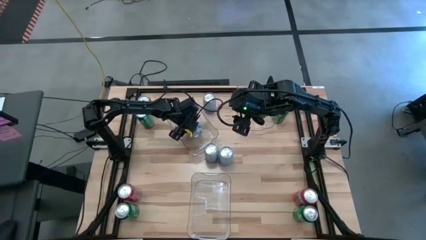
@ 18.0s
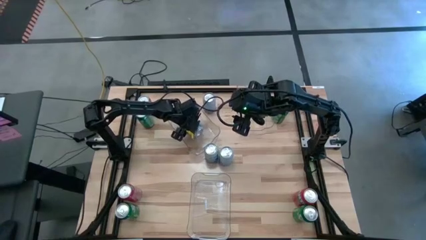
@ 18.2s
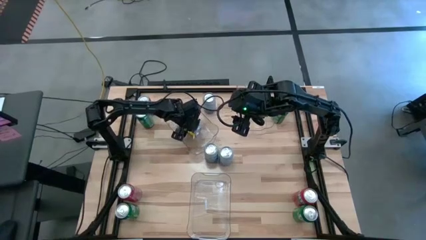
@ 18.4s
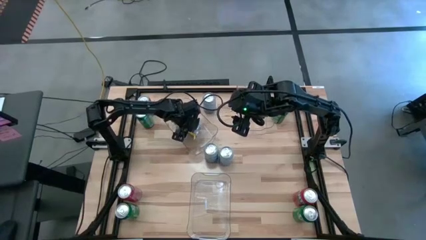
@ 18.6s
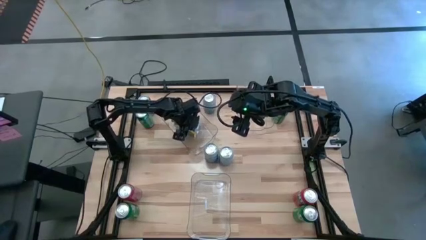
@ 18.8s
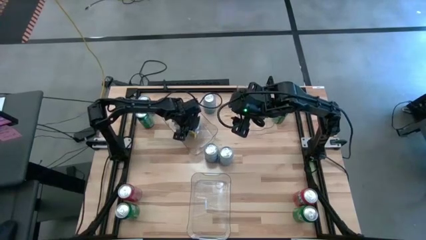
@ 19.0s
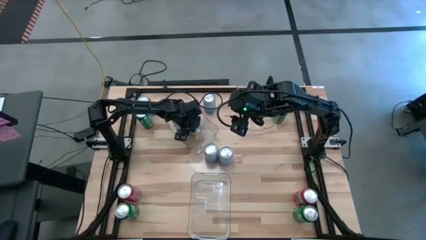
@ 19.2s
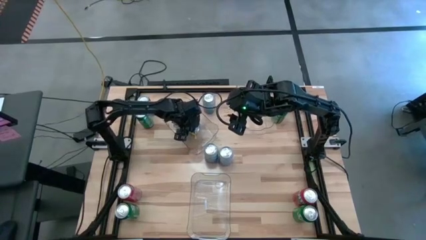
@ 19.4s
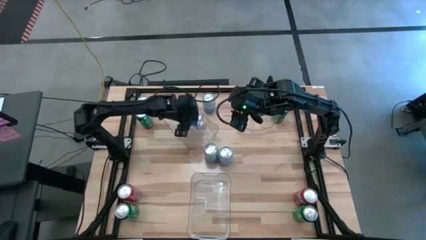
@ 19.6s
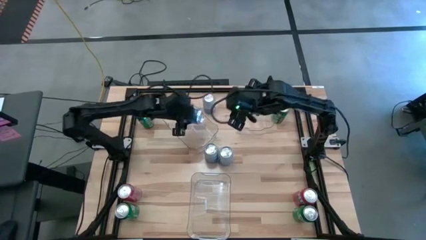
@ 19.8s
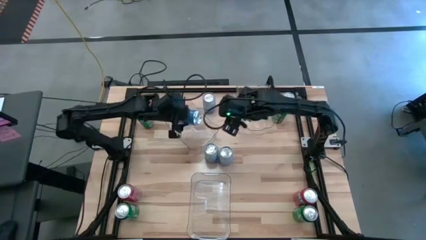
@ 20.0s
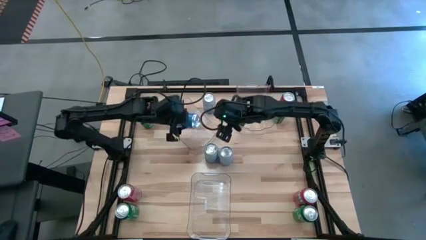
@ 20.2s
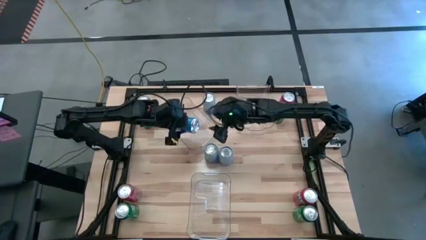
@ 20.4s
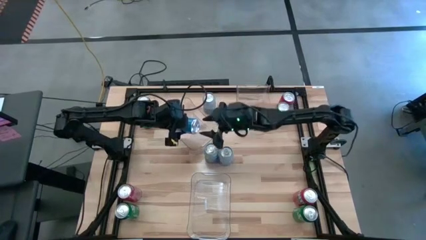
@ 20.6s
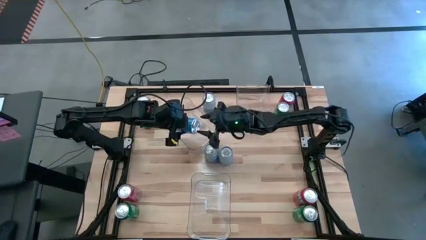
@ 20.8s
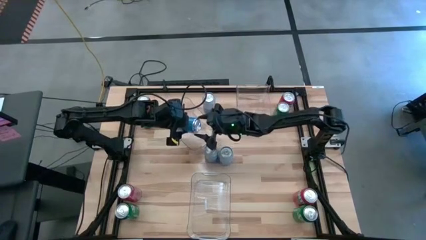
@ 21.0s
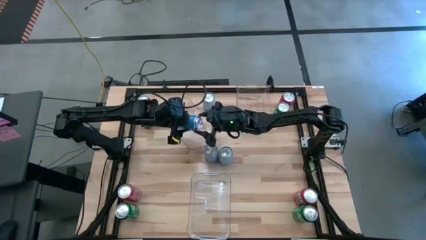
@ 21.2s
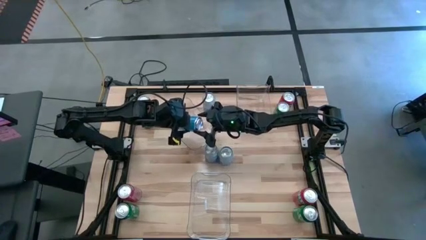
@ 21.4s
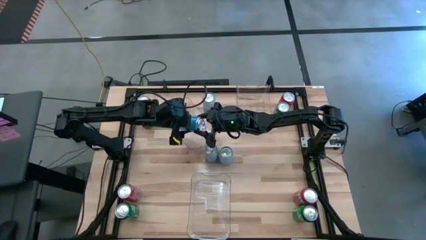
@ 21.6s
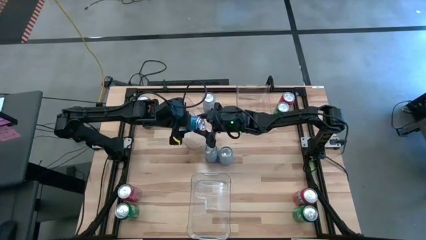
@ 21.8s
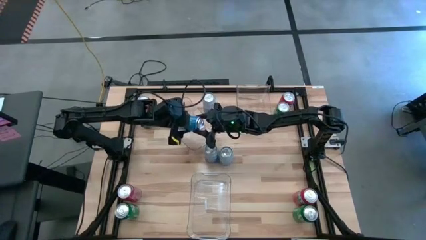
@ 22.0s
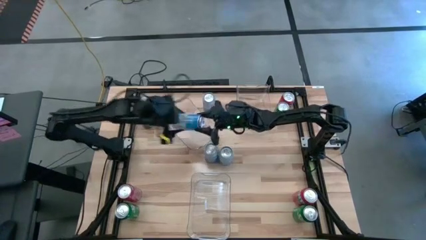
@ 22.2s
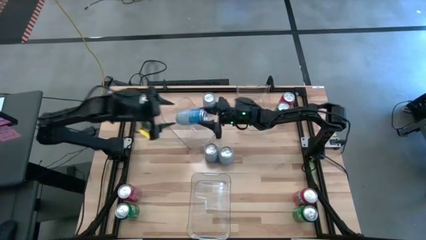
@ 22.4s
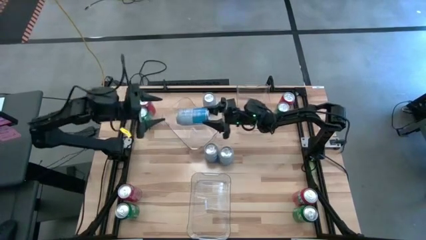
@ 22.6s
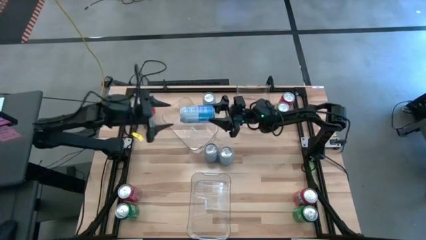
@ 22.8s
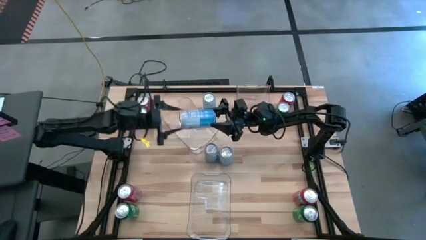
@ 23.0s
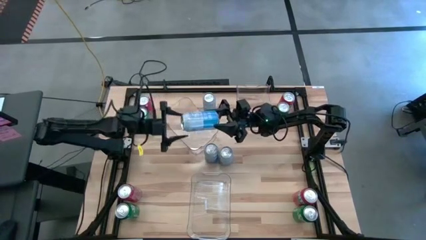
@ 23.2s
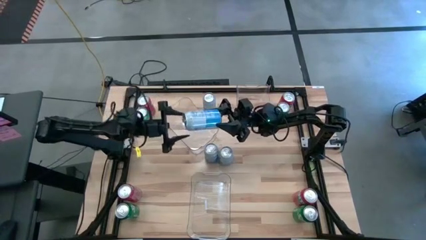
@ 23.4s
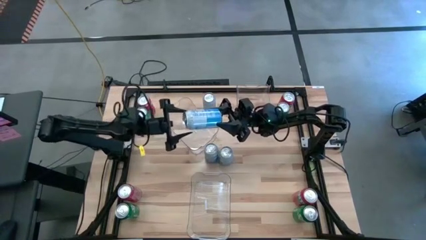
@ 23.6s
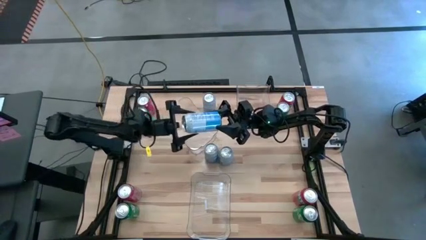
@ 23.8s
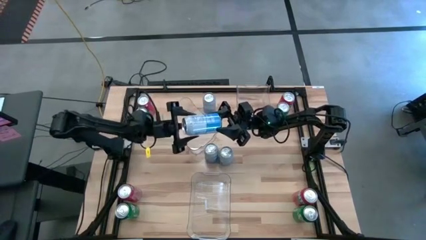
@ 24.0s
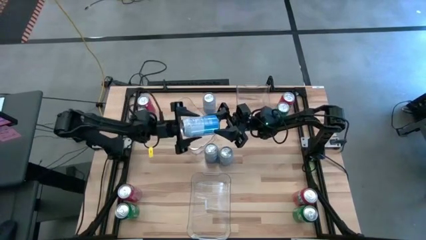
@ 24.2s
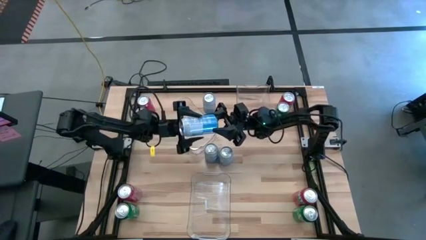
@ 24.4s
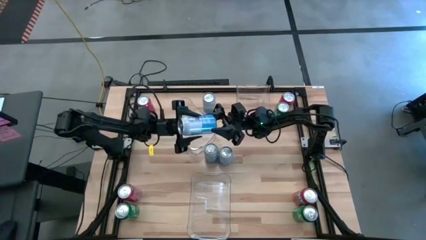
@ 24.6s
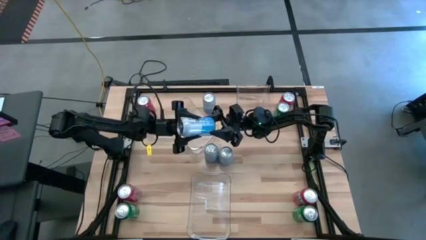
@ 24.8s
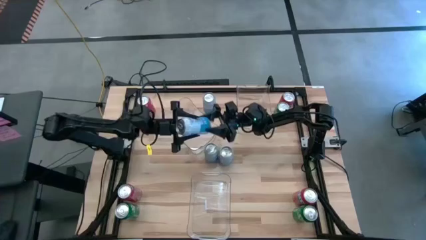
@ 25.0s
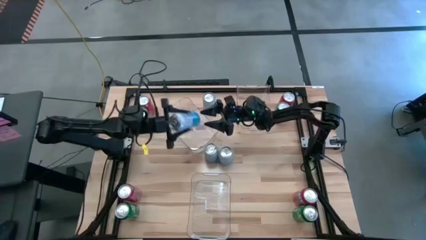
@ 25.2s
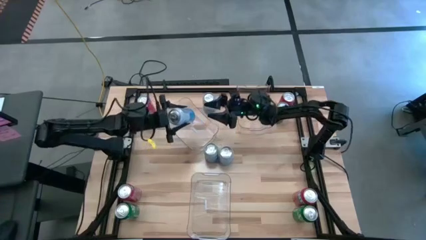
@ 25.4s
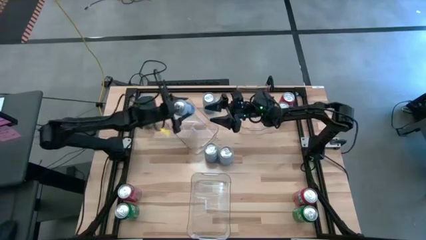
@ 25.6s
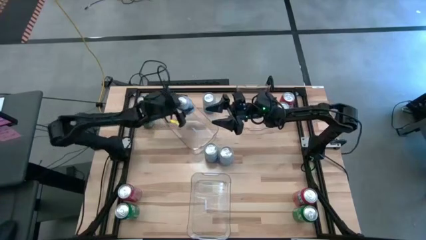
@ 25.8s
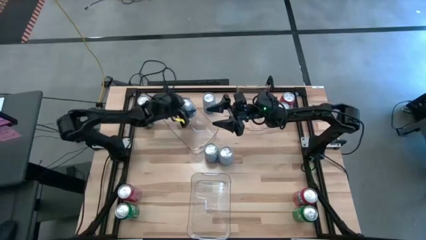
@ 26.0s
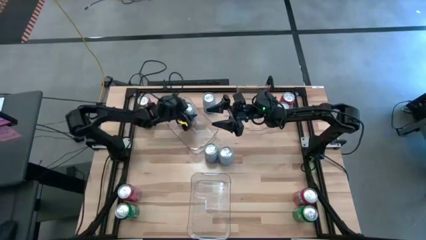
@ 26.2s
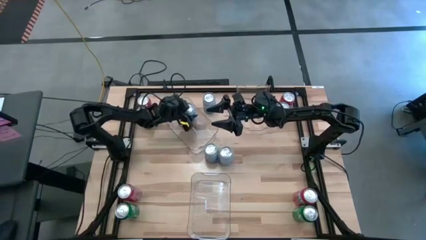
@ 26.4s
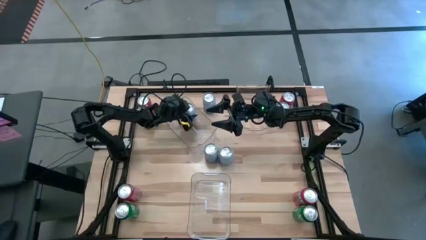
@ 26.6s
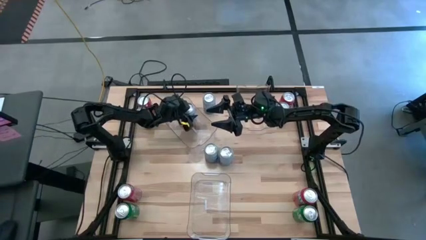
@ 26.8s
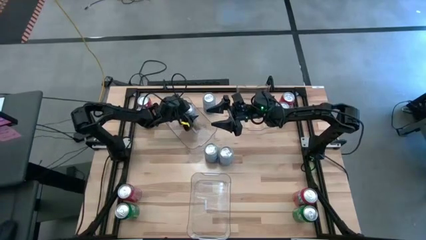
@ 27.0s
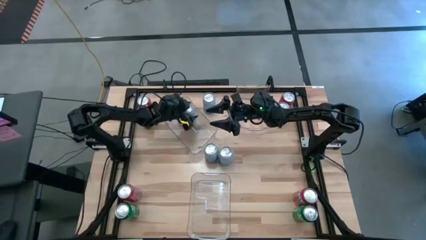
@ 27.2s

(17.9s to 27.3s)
Task: Sort soda cans
Put the top right blue-white soda can into the top left transparent bin
